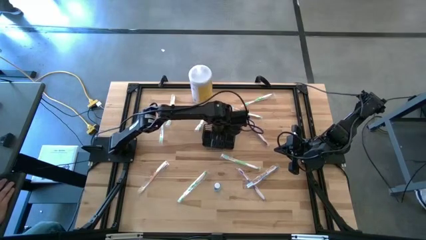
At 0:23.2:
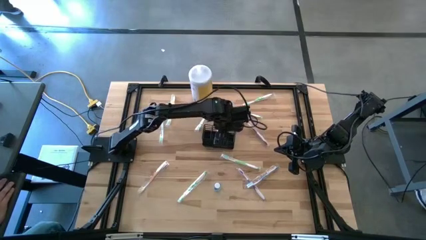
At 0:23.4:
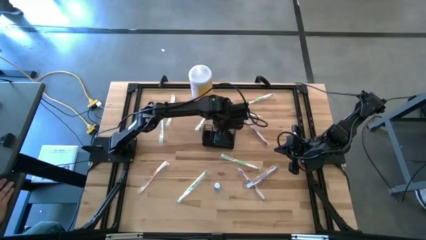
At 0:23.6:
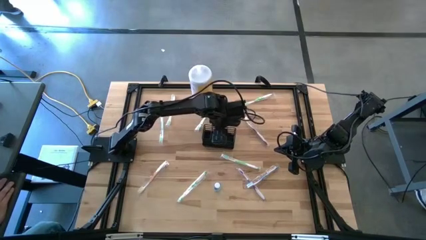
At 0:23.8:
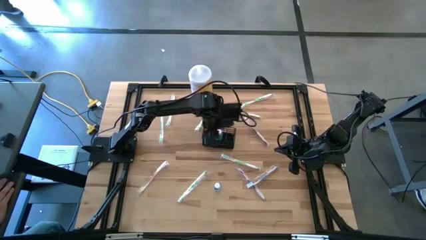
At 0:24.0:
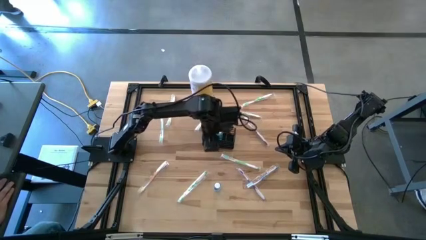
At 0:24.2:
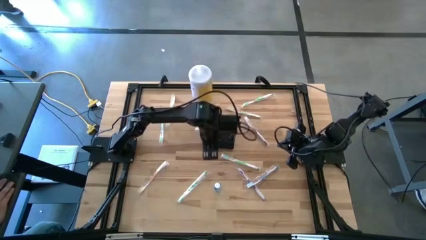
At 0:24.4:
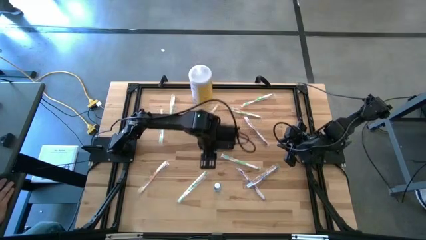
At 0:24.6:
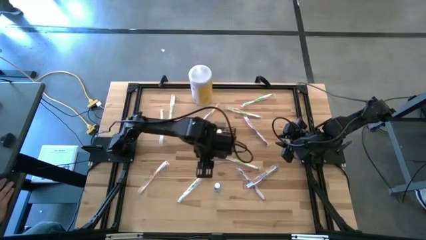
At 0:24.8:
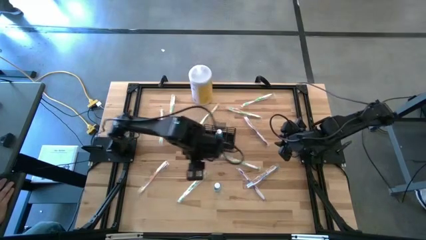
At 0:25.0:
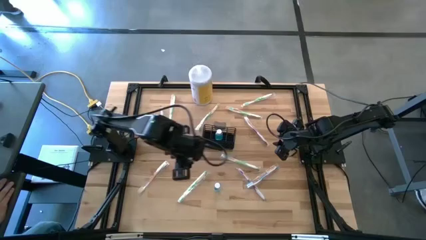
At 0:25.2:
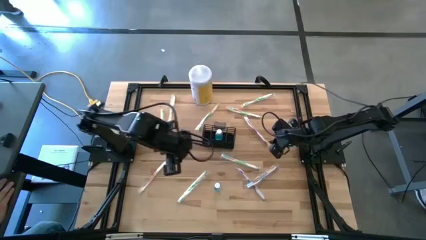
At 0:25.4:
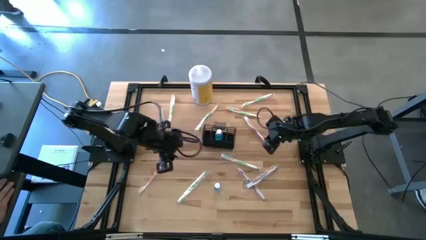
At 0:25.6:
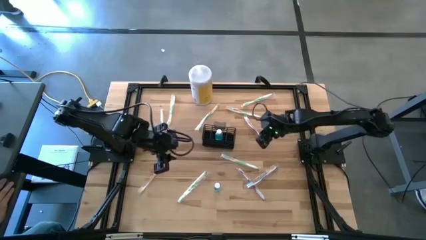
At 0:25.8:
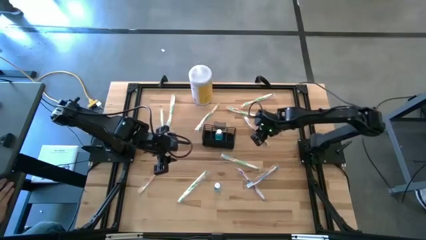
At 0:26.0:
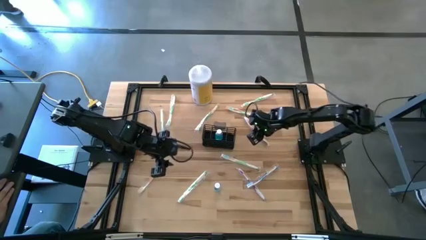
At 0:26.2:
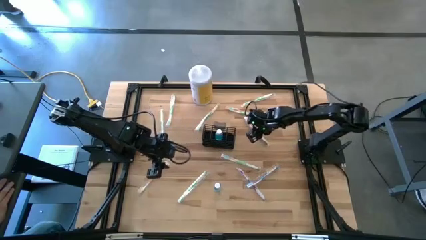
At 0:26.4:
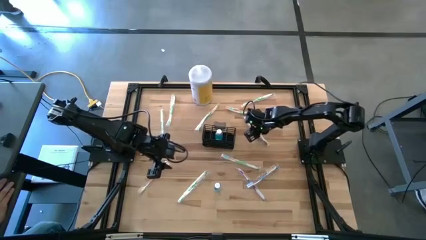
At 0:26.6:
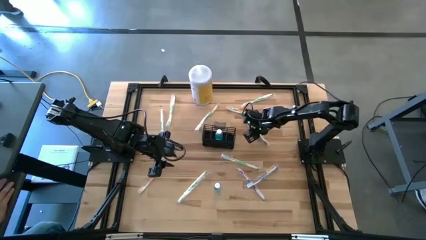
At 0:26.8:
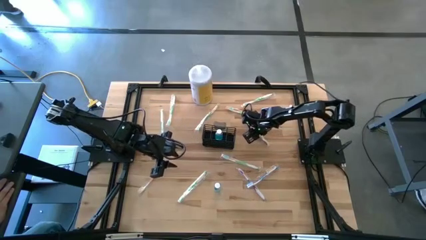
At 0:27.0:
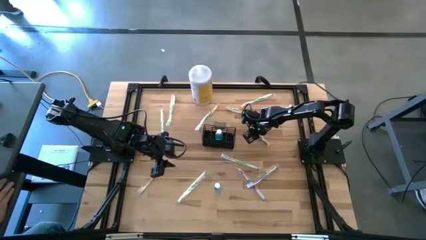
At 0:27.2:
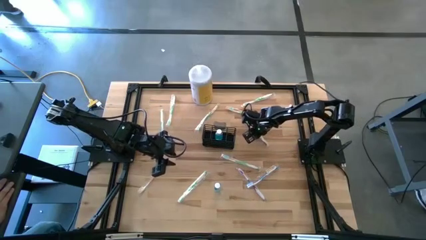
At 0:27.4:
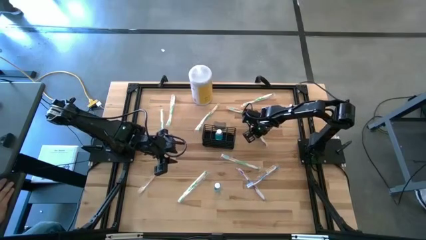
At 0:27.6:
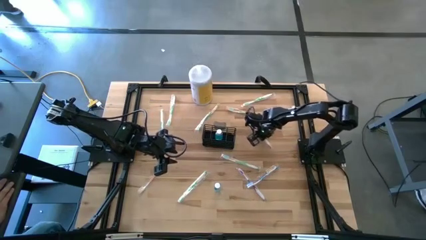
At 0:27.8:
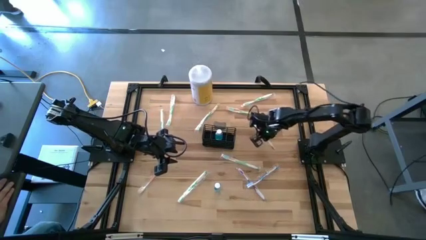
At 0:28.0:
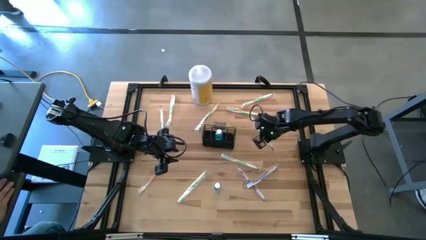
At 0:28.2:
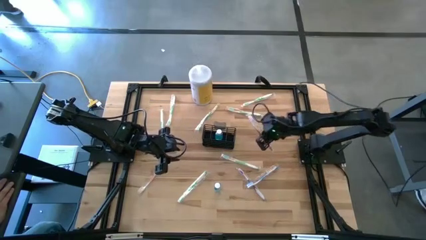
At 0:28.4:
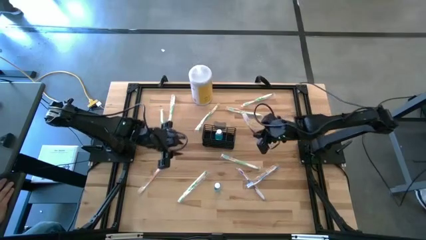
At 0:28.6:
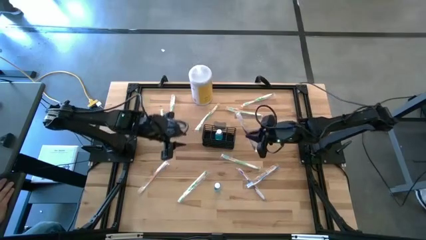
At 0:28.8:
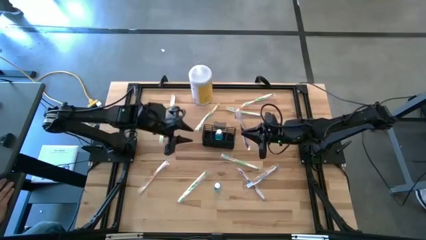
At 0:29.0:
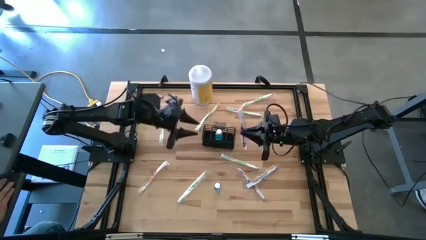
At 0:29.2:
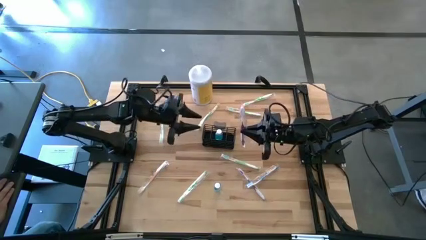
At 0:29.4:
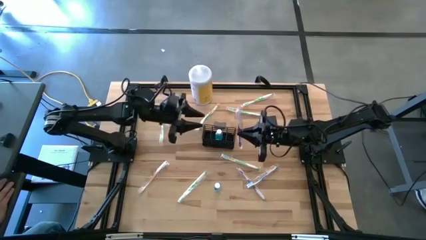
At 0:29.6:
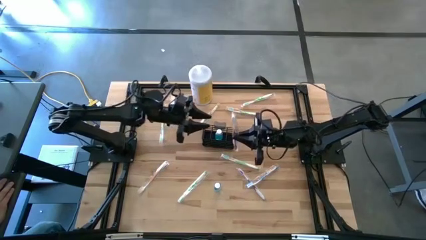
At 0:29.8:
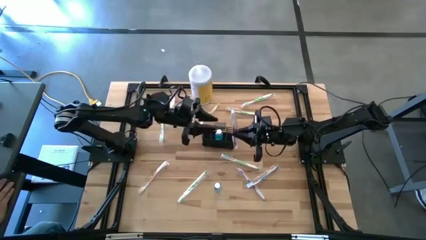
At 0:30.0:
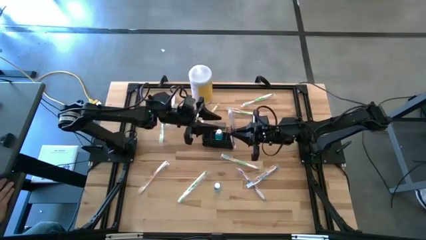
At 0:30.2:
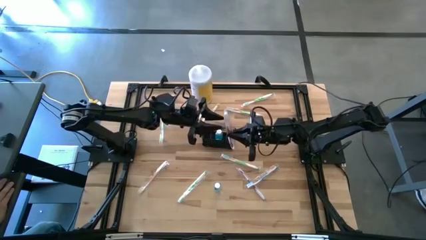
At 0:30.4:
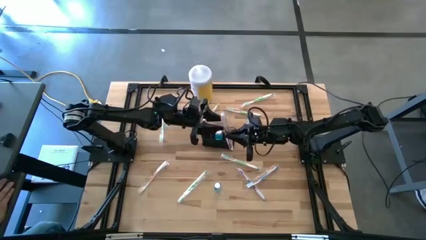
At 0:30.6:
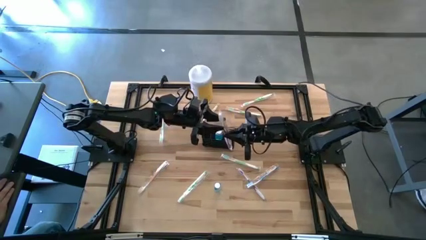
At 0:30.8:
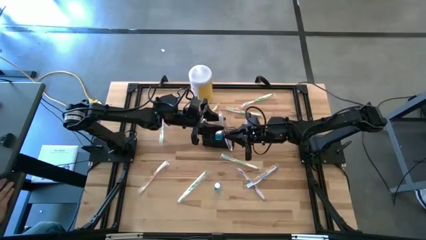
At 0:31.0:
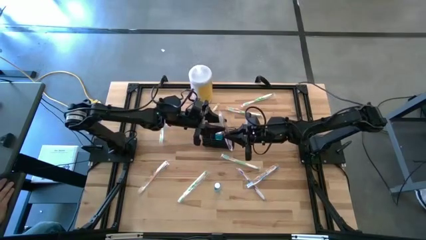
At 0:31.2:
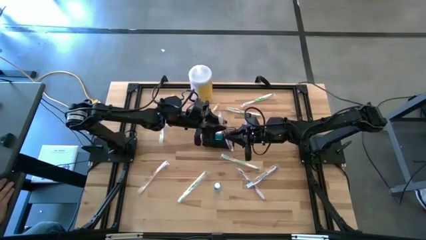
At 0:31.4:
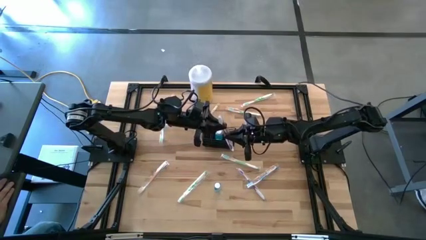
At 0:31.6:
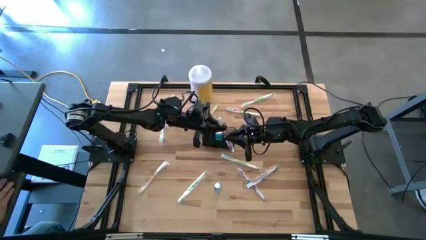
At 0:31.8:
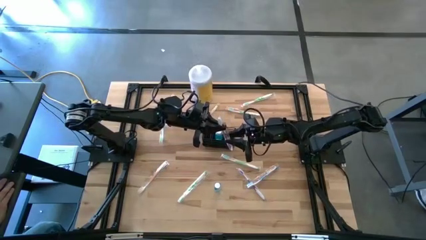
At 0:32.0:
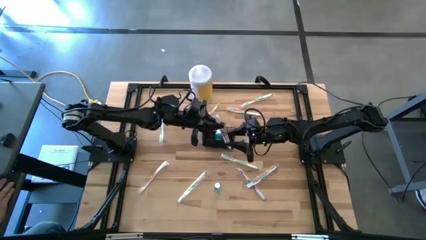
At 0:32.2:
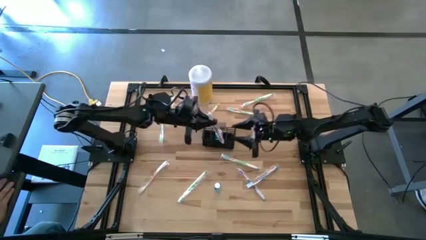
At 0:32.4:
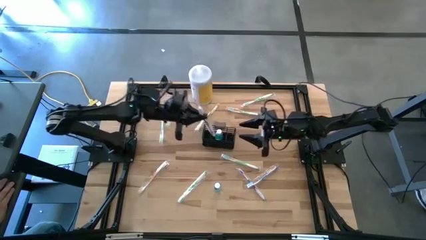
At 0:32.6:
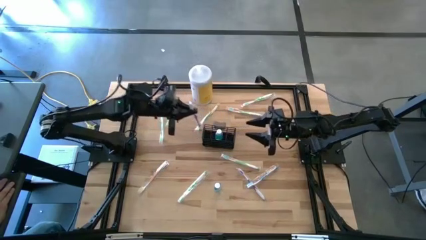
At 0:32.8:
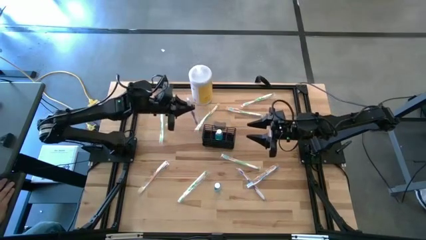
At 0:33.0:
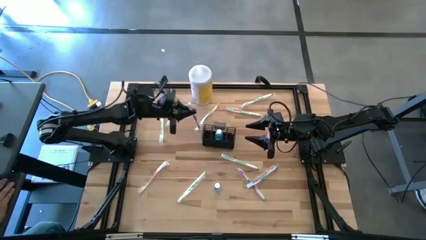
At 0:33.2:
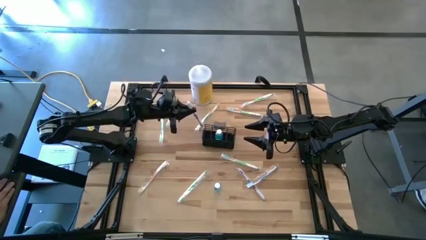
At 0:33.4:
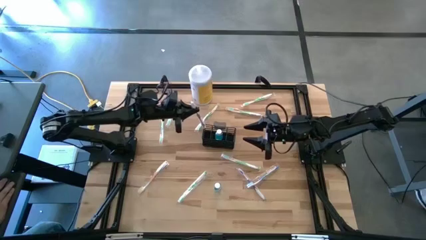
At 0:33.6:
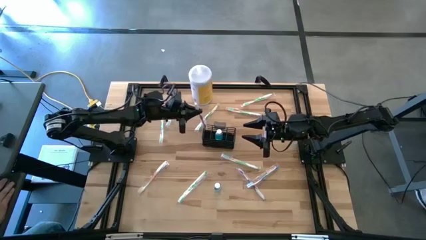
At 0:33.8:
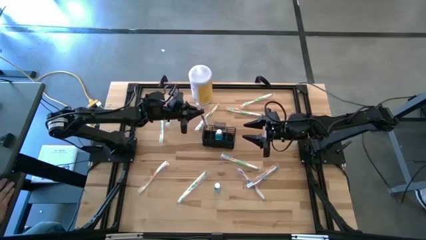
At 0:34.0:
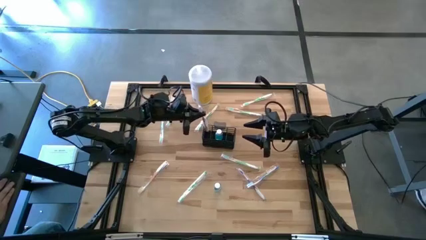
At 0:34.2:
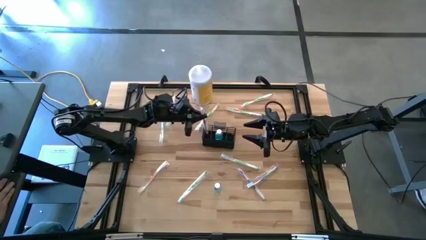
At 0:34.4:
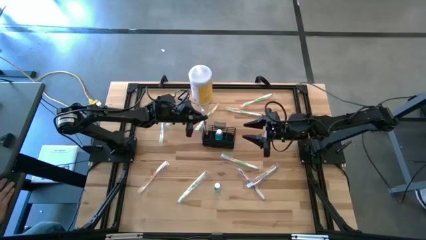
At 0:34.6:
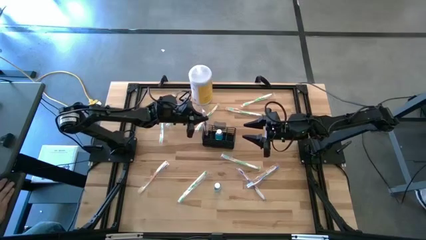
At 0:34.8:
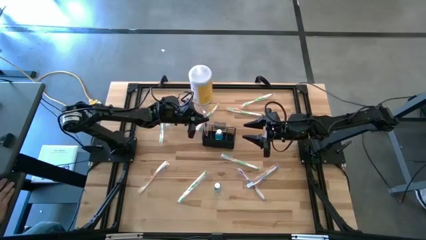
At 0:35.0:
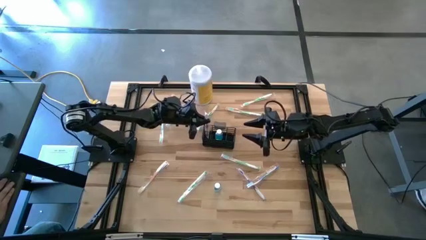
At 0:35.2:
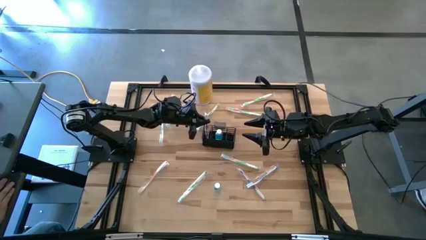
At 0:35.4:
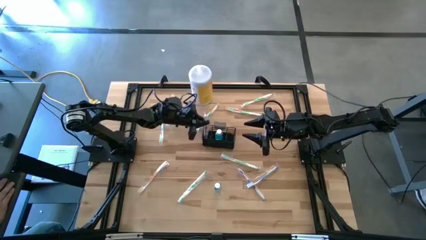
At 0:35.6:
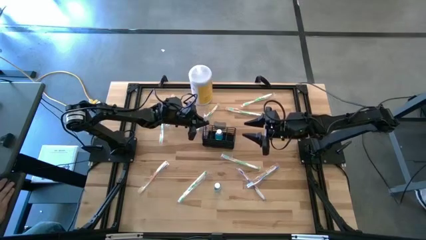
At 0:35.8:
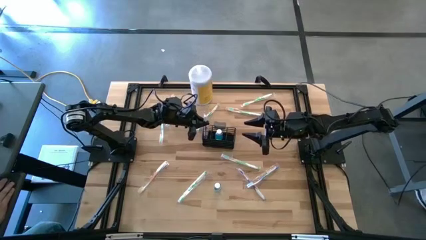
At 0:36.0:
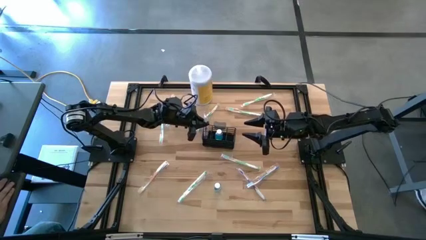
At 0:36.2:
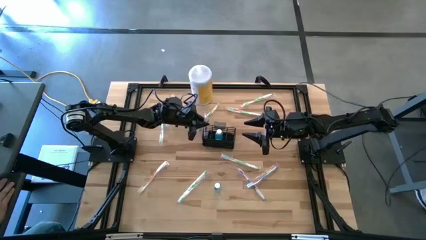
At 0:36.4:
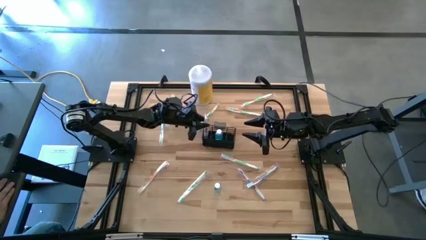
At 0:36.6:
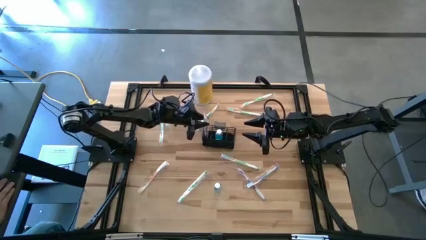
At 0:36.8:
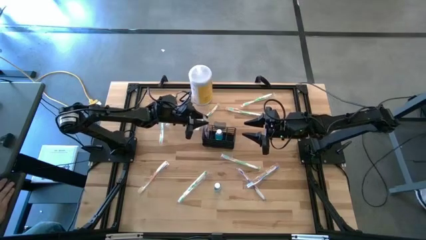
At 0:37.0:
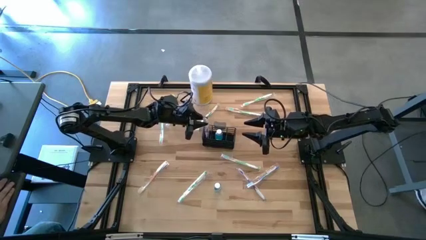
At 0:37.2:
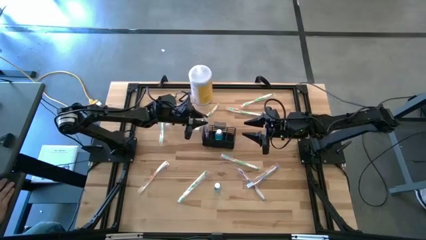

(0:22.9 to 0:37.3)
Task: Pick & Place toothbrushing station
Put the top purple toothbrush into the left section wire organizer

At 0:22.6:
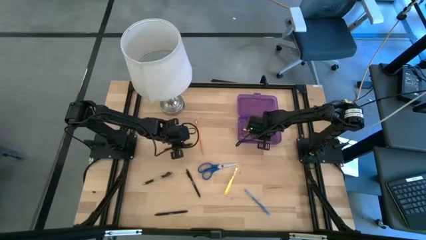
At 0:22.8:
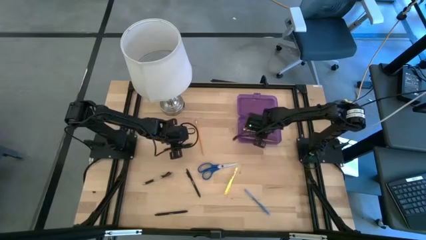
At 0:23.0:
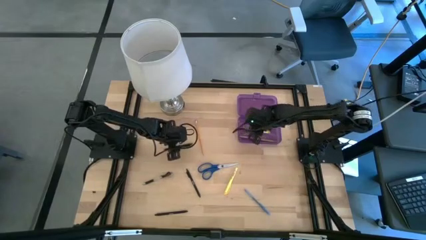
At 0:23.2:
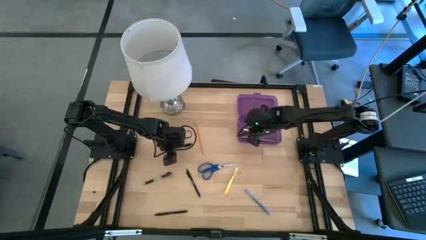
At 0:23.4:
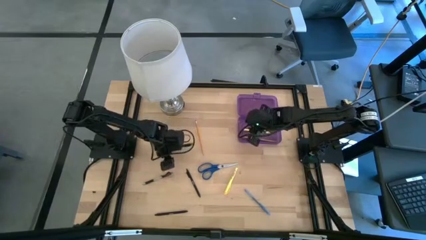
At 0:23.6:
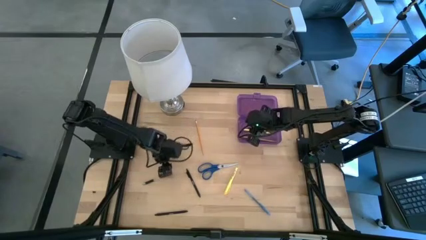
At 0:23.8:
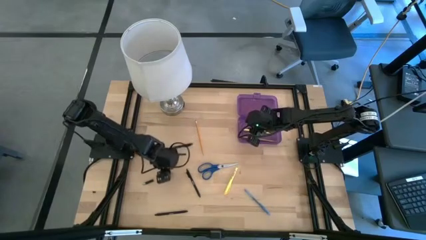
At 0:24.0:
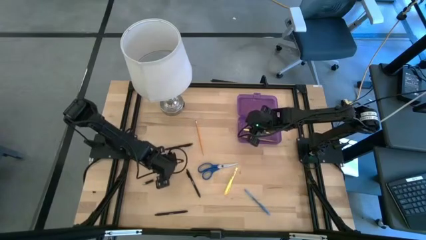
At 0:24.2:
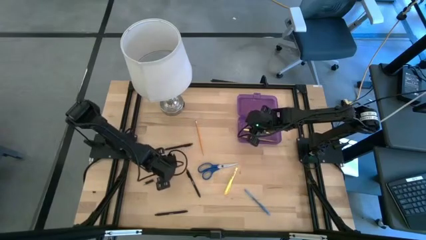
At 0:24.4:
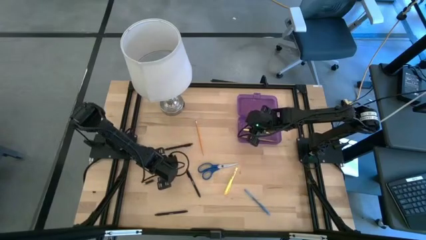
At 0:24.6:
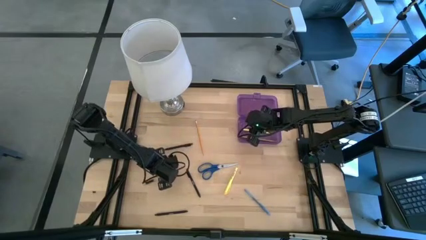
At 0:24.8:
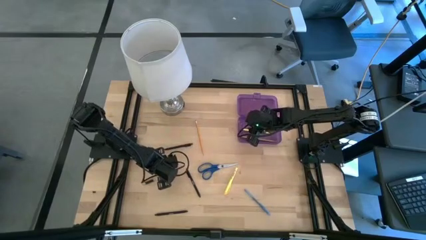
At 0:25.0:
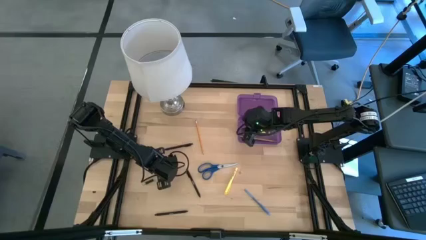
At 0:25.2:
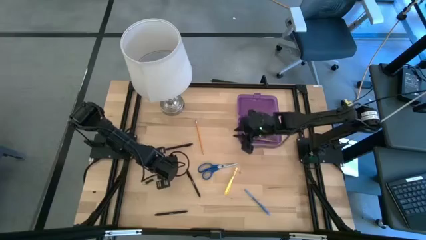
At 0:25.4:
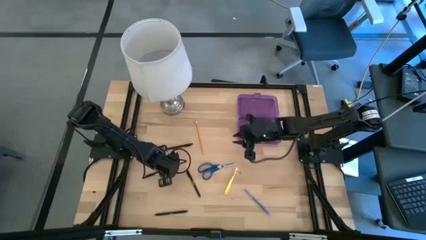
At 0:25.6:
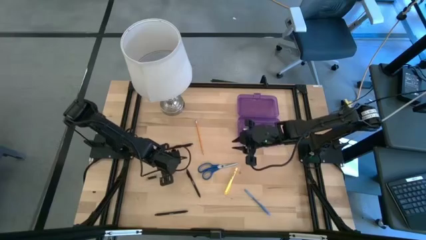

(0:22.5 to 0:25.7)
Task: Pick & place school supplies into a supply box
Put the transparent pen into the purple supply box
